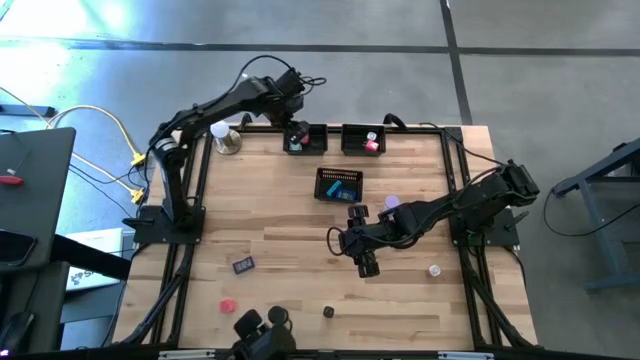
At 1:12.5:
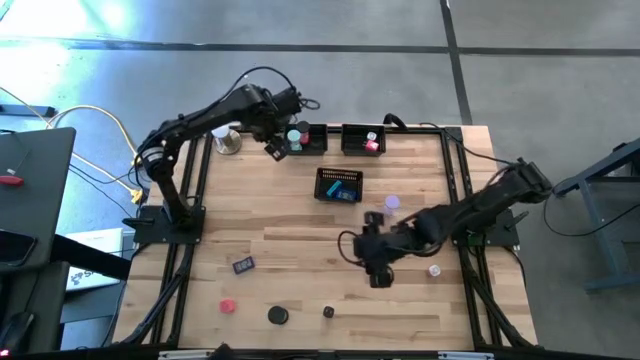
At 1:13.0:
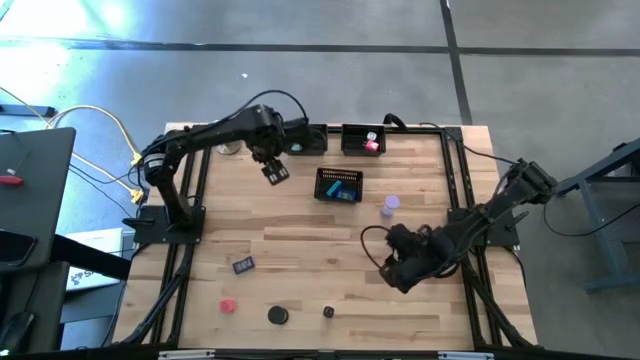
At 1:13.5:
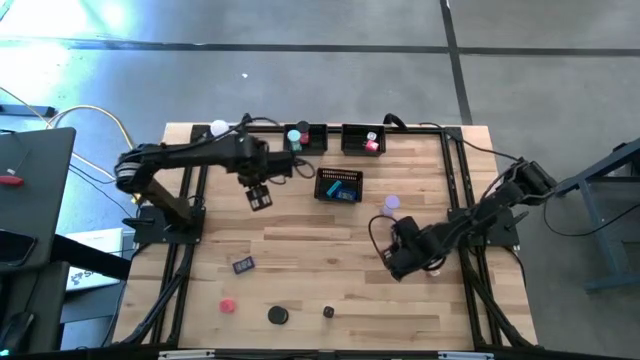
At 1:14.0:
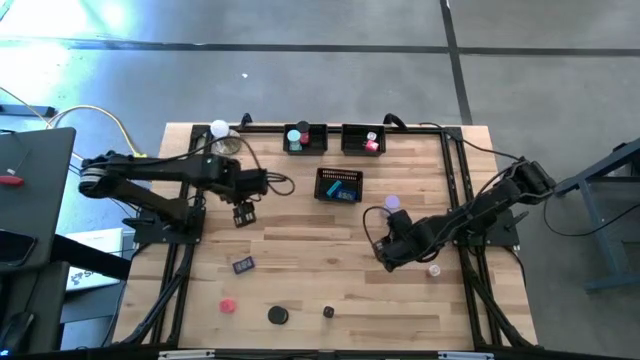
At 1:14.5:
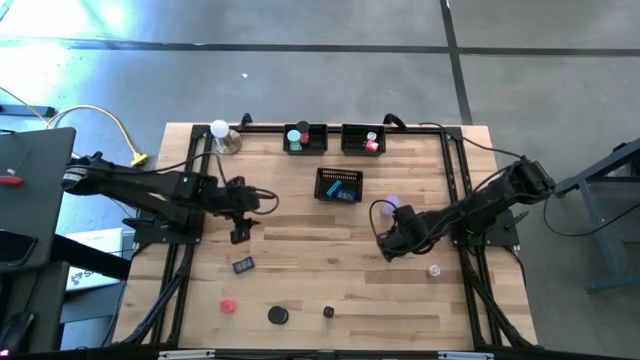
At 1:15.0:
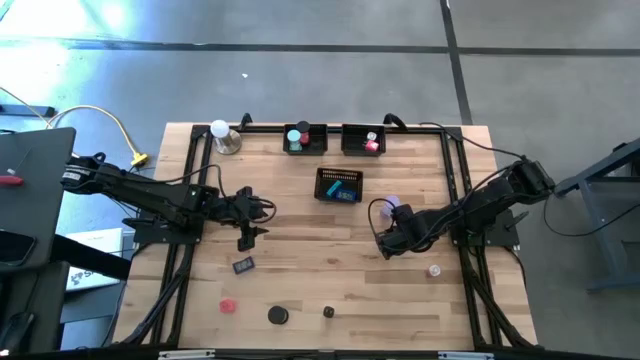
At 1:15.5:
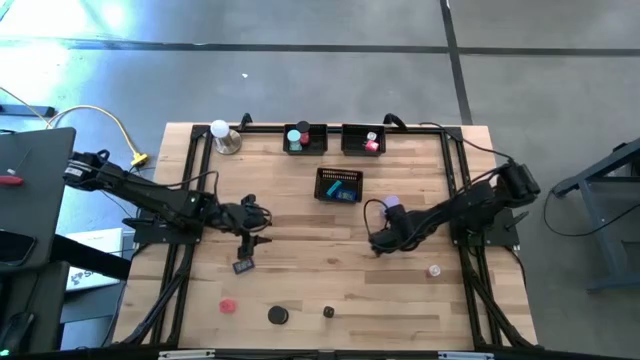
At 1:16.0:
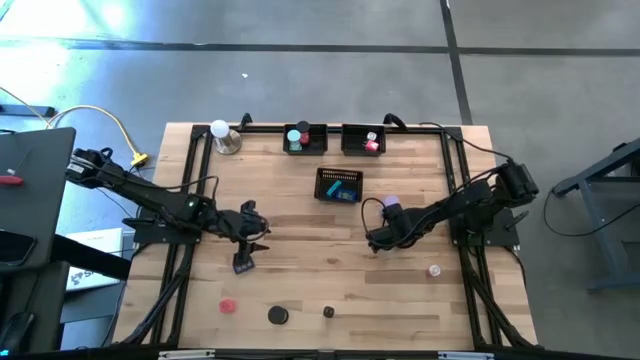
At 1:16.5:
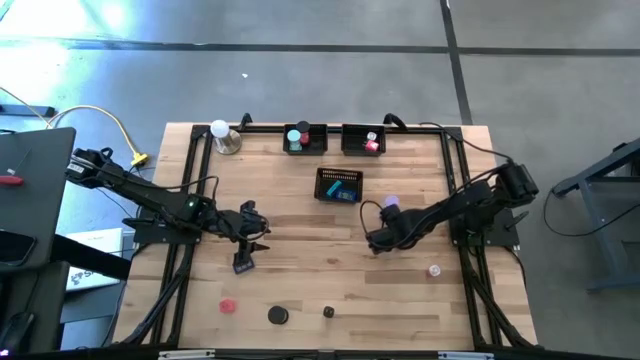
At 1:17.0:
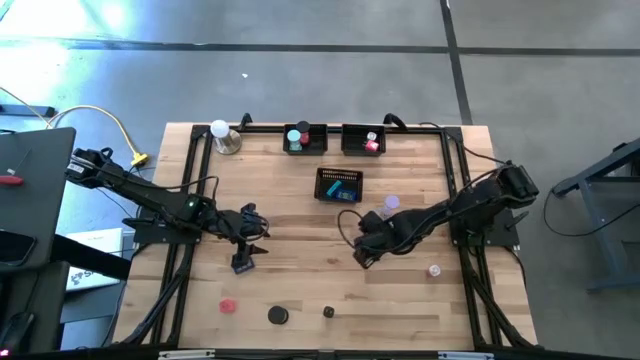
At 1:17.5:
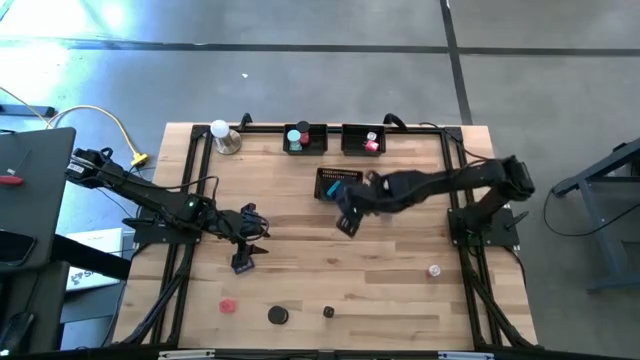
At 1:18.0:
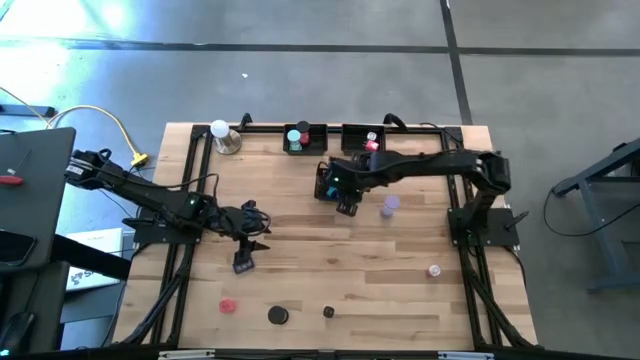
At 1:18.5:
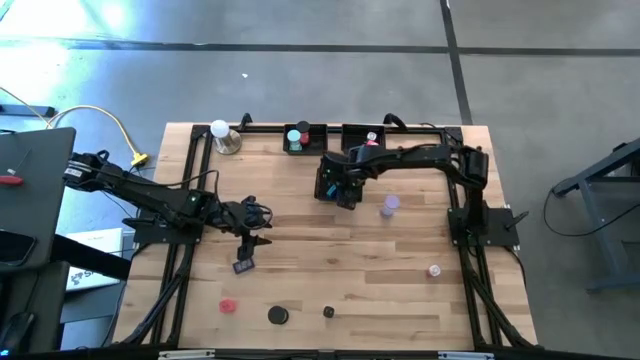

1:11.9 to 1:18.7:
Task: Pick & Place Office items
Put the right blue digital timer into the bottom black bin

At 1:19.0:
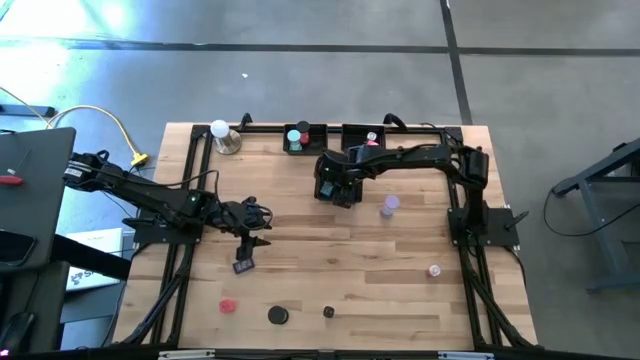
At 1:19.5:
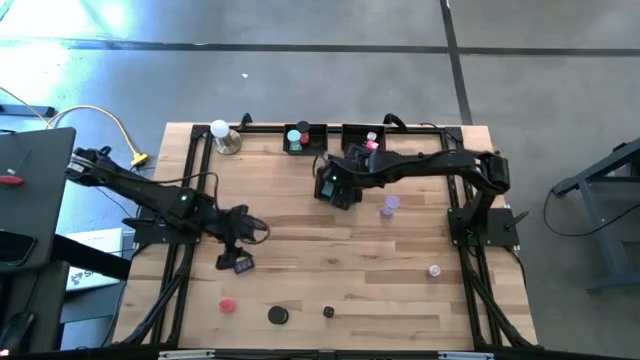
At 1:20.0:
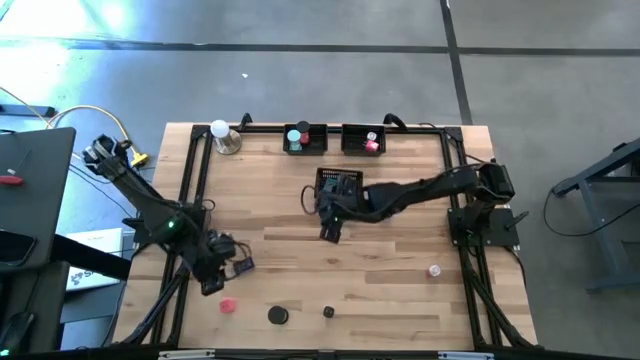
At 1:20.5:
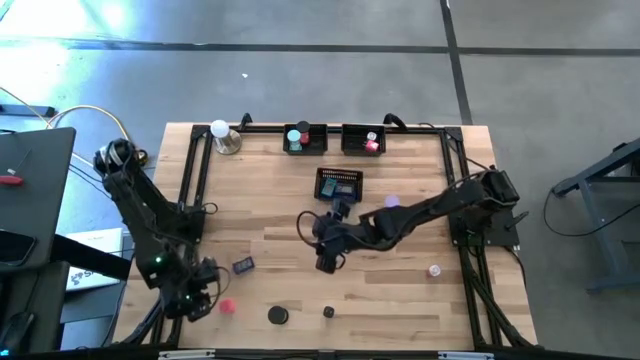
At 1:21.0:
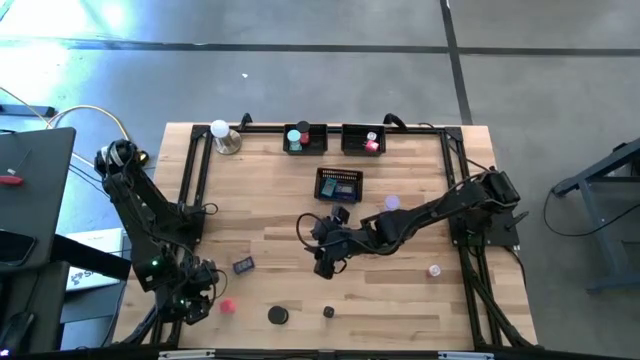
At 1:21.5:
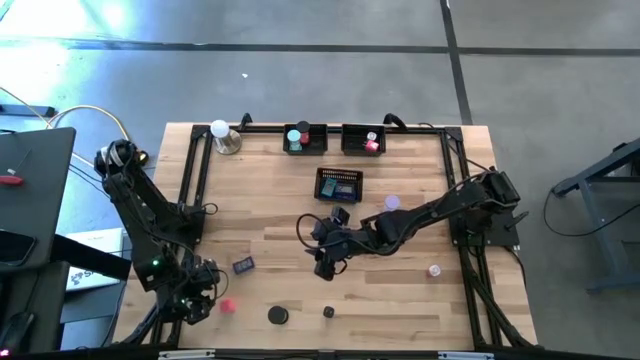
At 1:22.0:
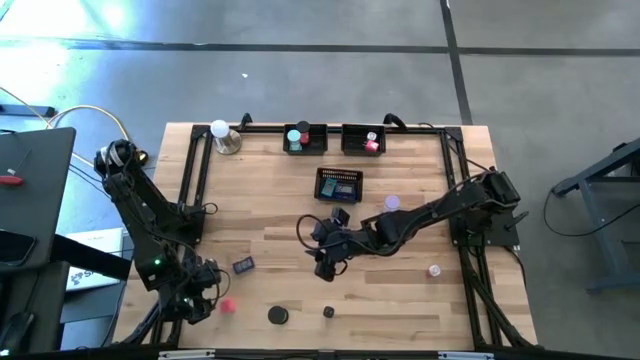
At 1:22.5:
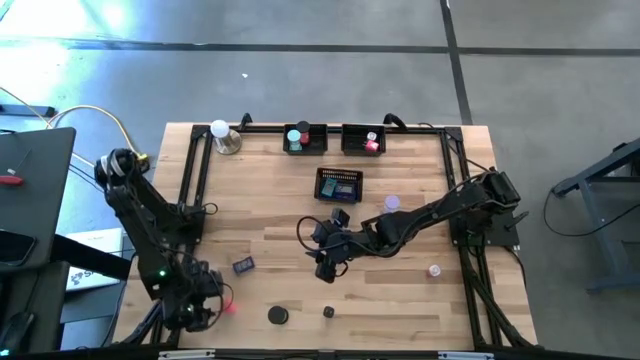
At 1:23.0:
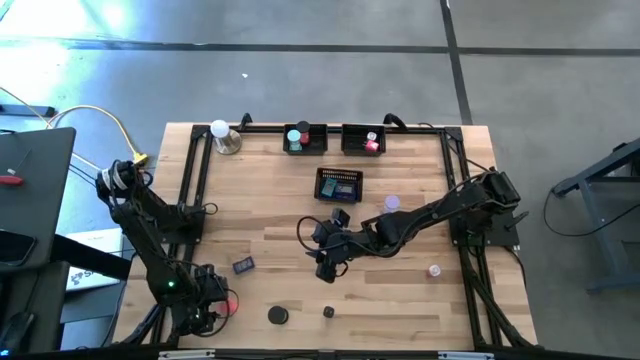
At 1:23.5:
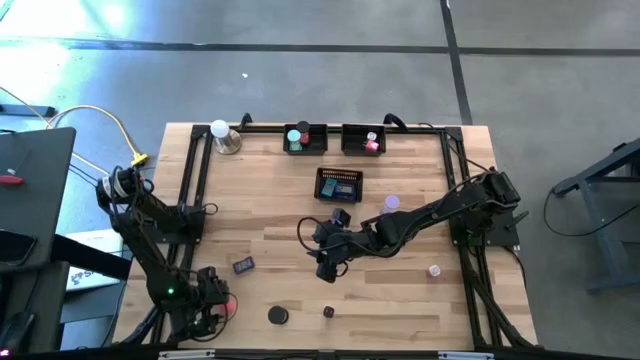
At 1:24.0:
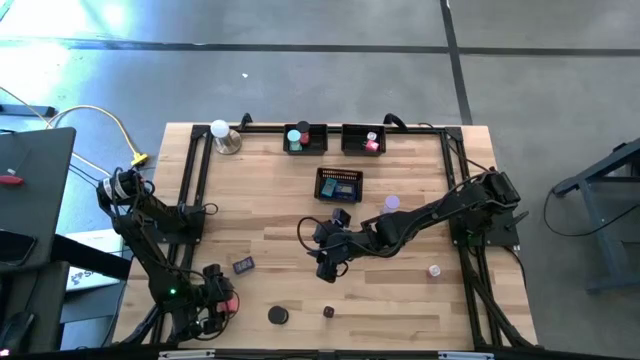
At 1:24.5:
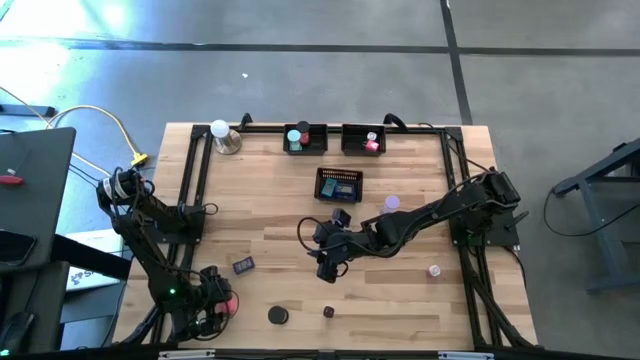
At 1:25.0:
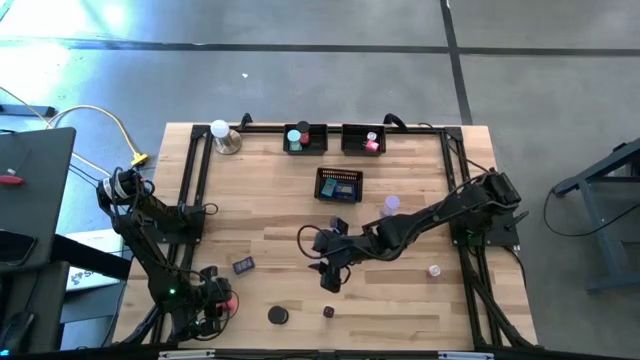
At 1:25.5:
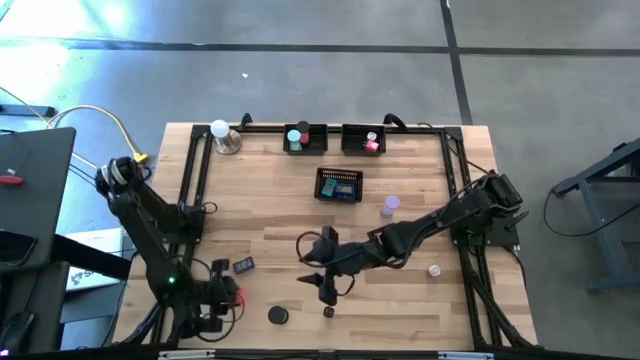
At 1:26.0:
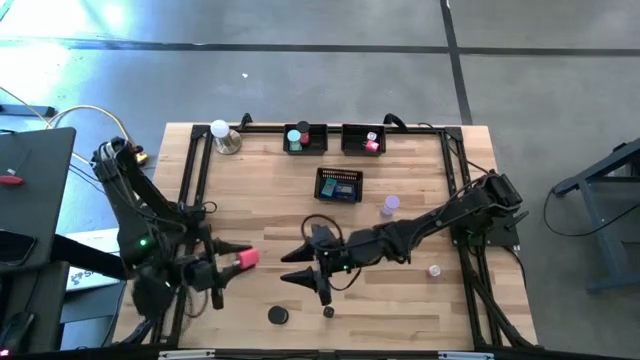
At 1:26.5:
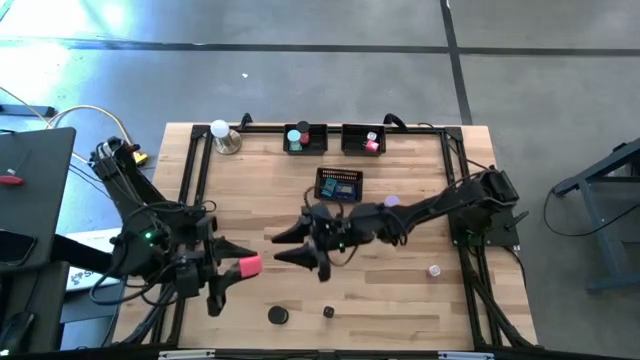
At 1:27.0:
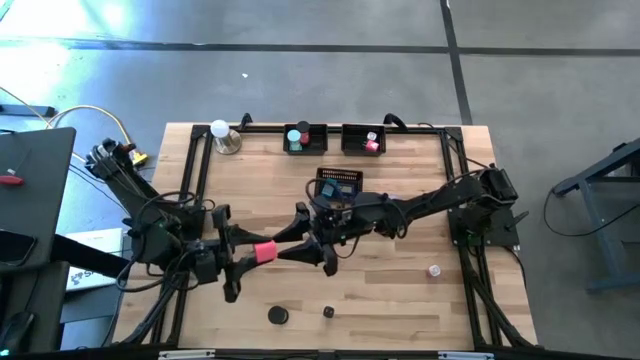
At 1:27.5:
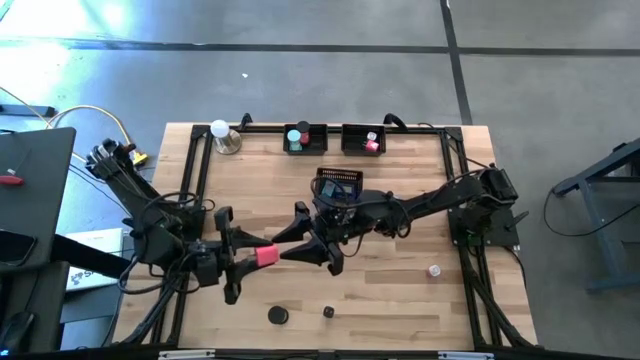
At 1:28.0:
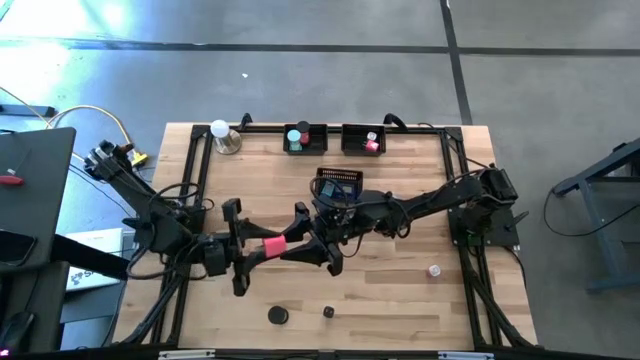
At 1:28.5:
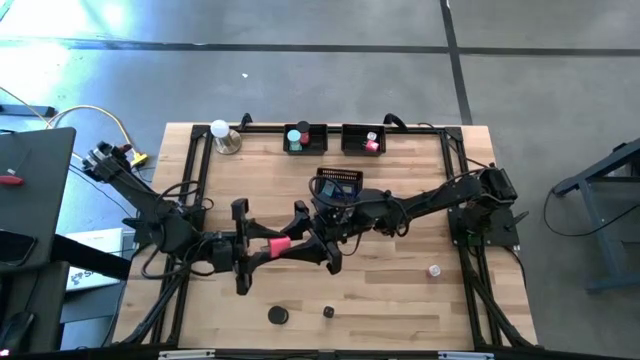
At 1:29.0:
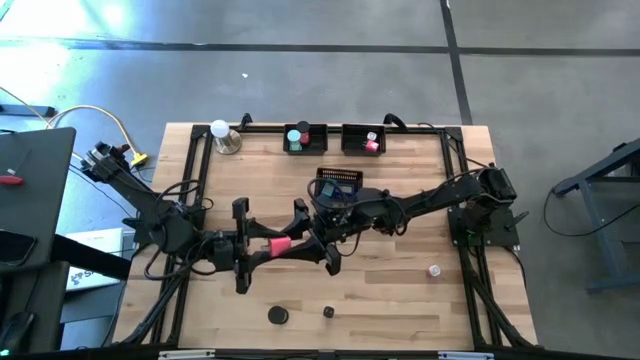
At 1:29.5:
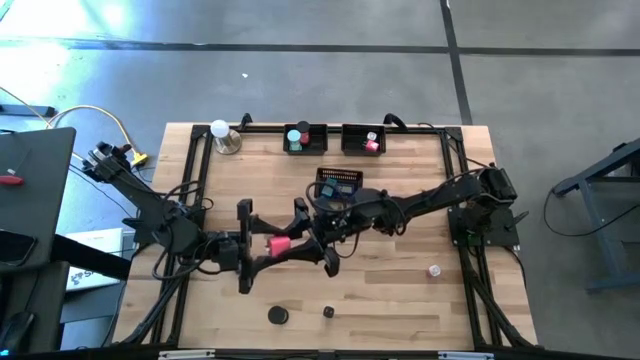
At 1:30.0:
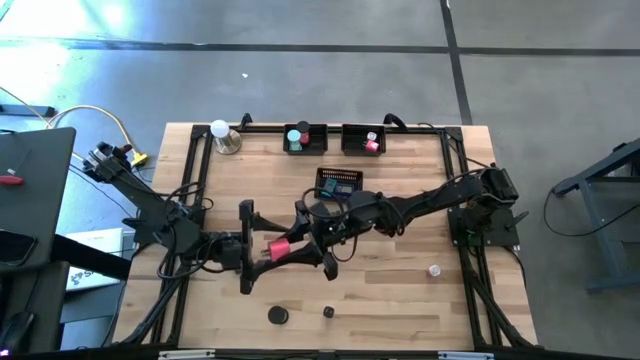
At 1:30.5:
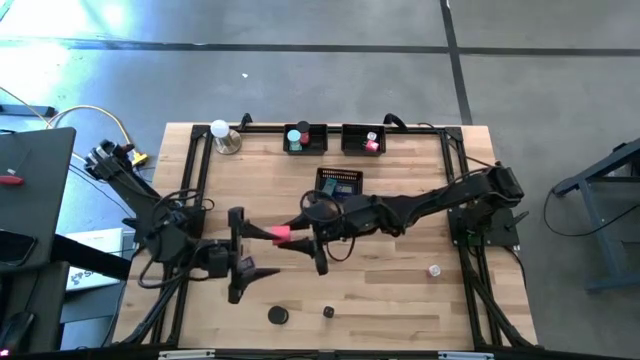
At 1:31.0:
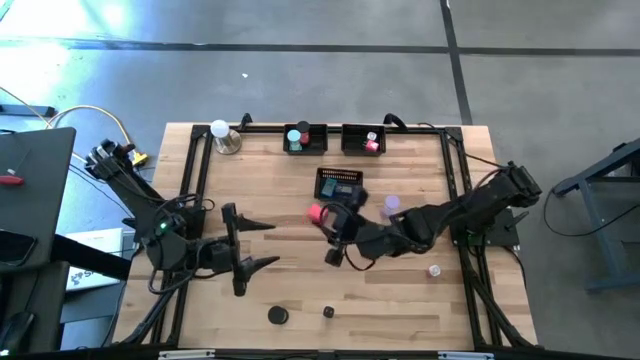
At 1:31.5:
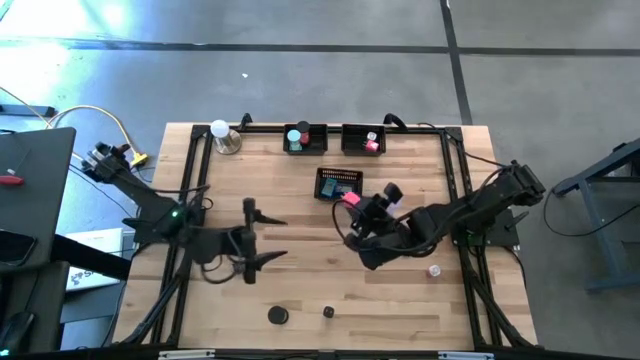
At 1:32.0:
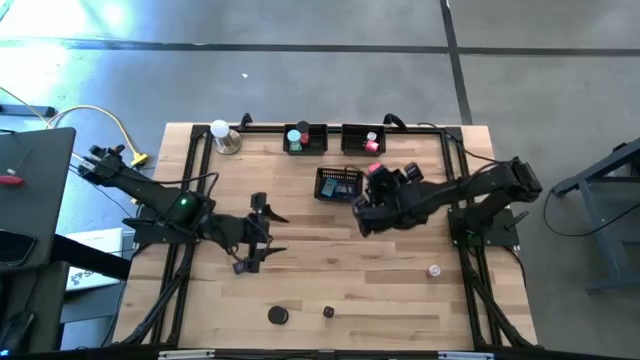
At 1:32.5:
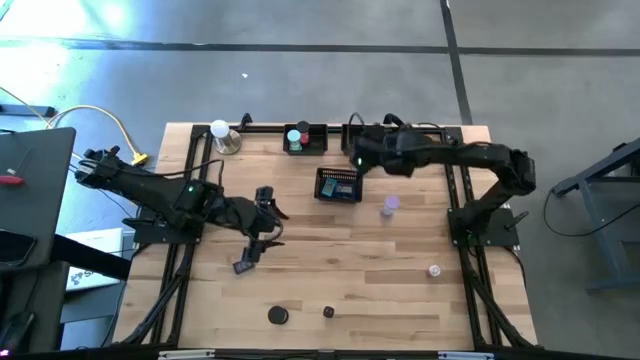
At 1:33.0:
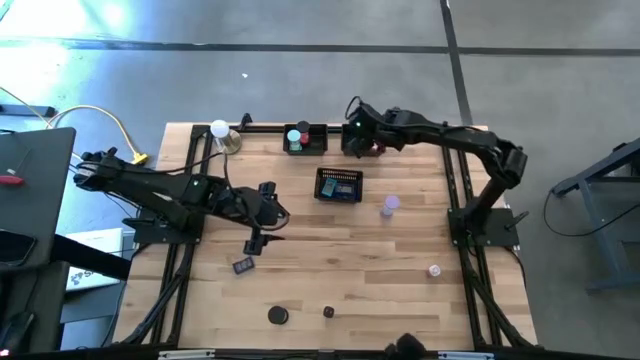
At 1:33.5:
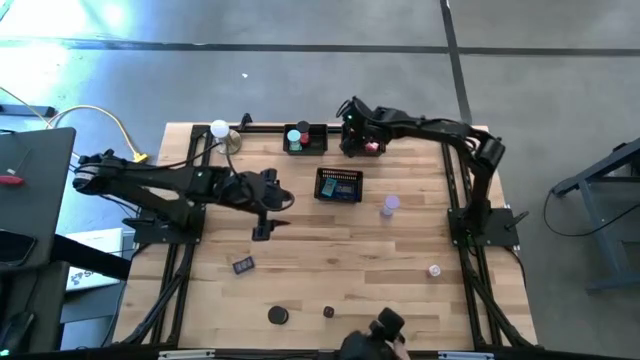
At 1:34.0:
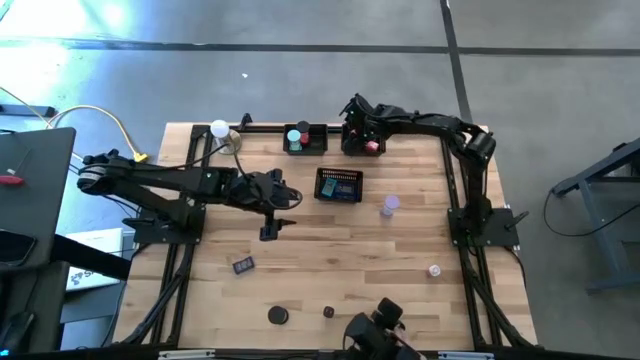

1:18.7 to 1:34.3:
Put the pink charger adapter into the top right black bin
